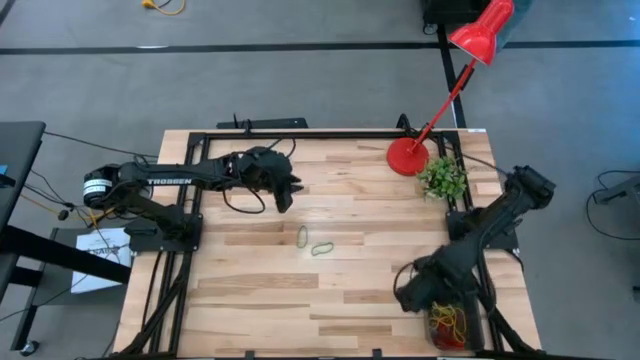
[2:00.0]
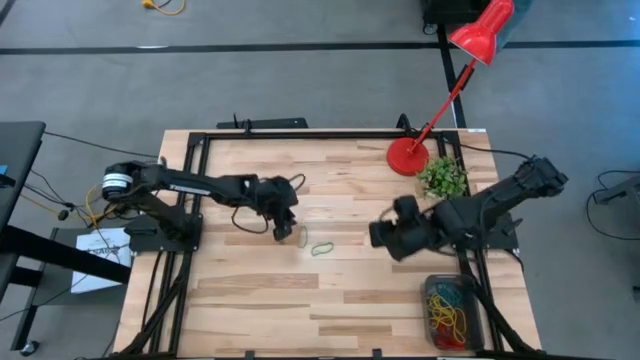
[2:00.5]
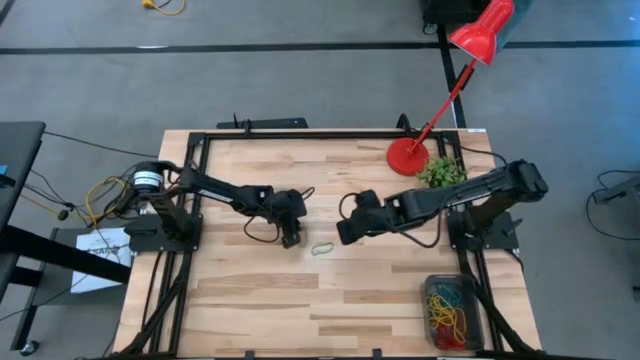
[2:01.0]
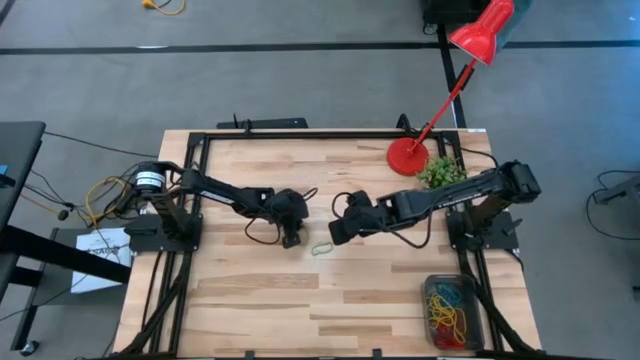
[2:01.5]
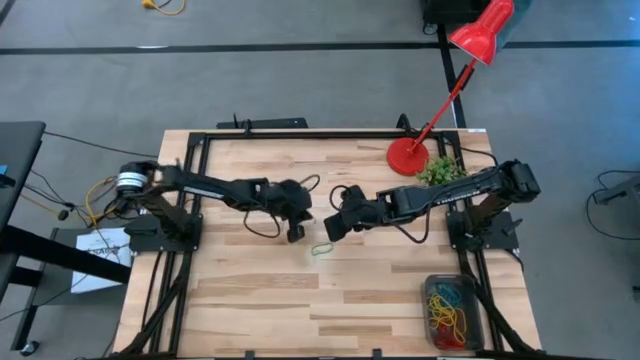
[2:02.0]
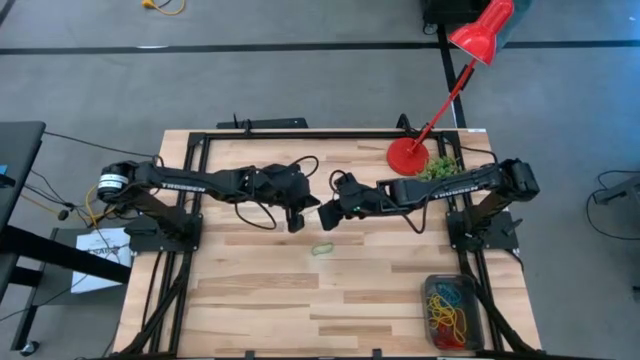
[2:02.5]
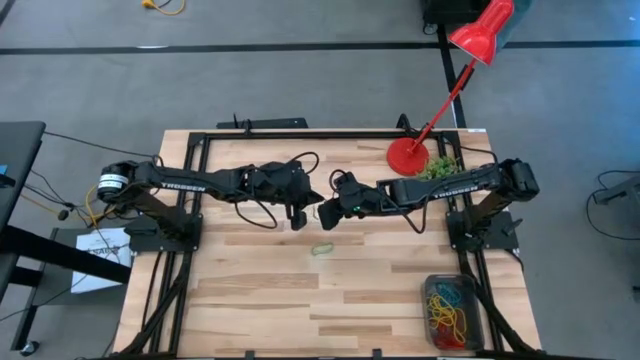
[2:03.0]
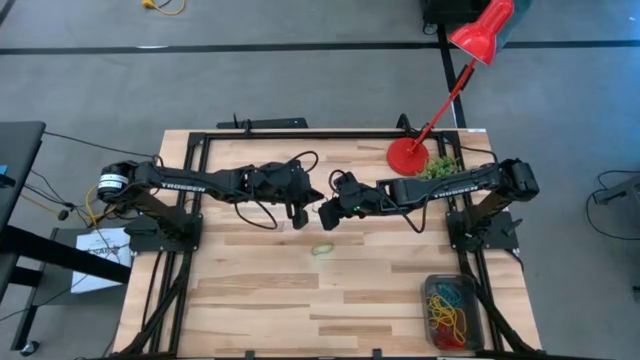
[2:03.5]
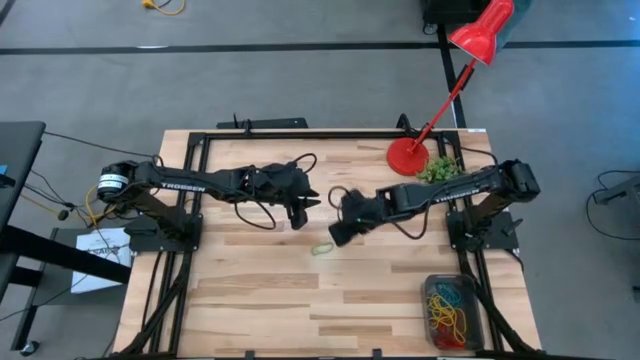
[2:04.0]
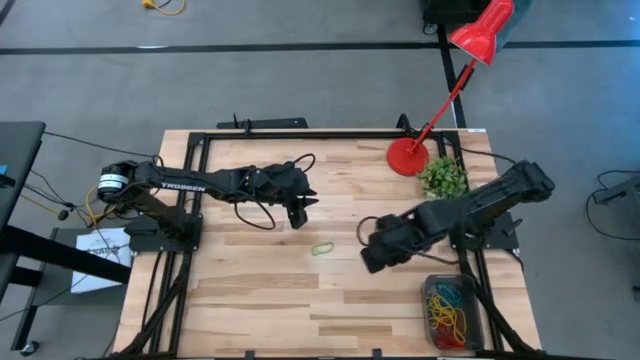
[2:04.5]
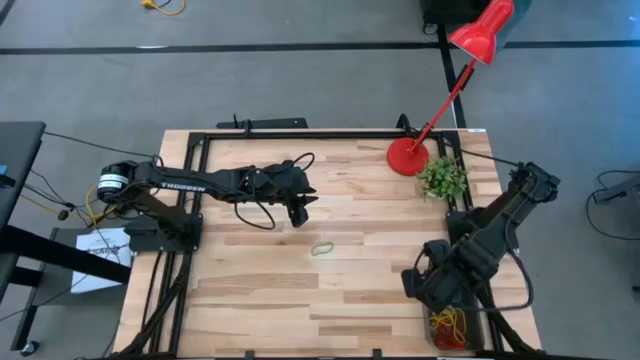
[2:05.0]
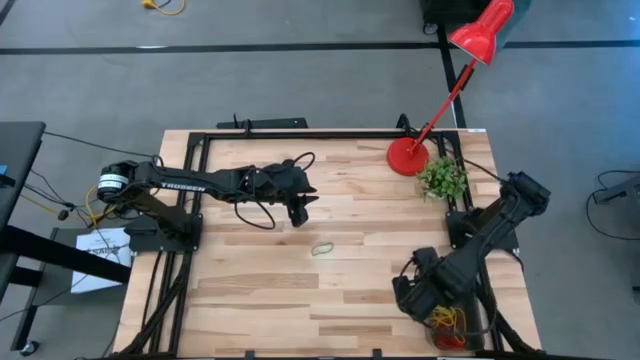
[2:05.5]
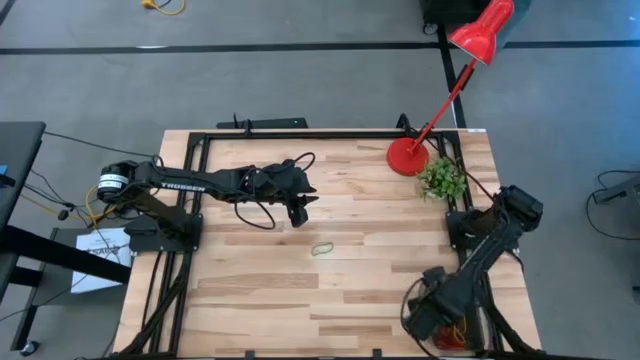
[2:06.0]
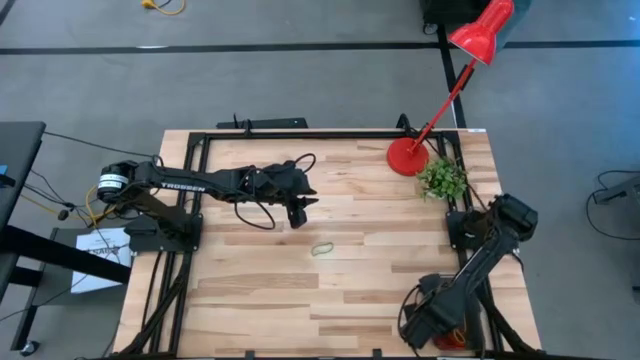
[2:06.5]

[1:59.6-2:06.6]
Task: Pick and place items into bin
Put the green rubber band into the black bin

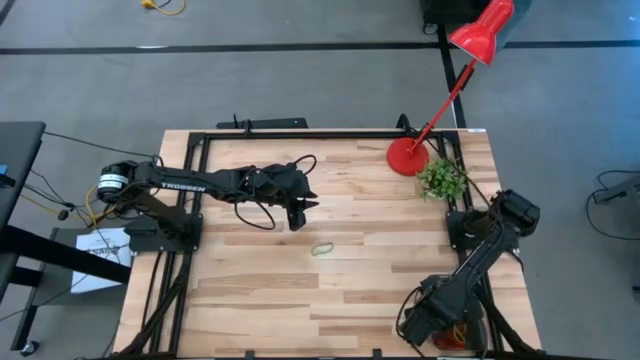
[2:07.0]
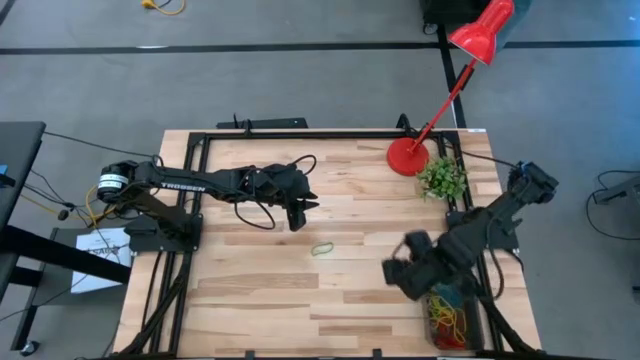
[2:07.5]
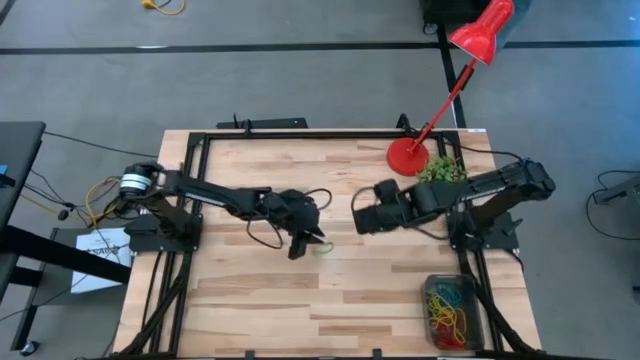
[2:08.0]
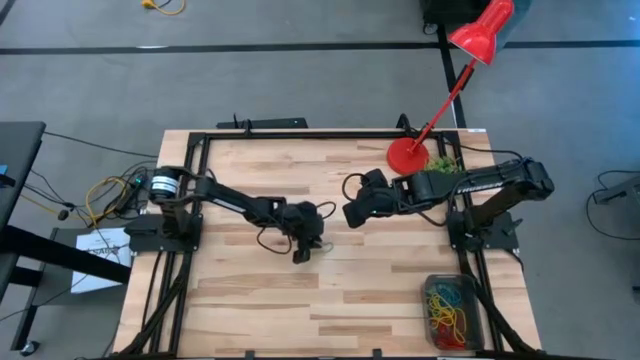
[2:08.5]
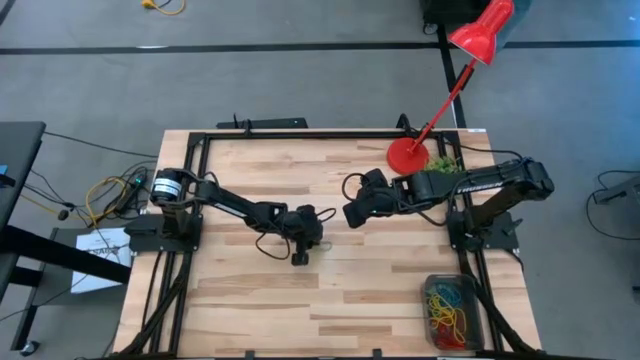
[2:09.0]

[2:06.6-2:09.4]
Put the green rubber band into the black bin

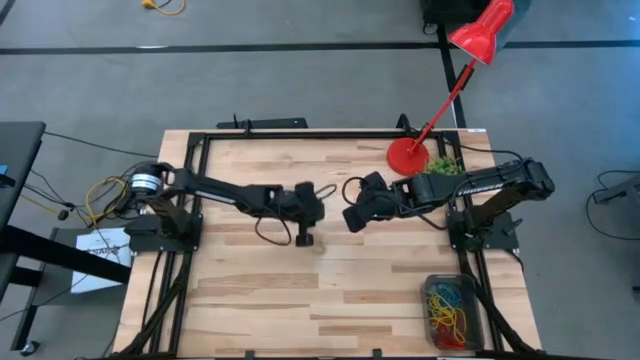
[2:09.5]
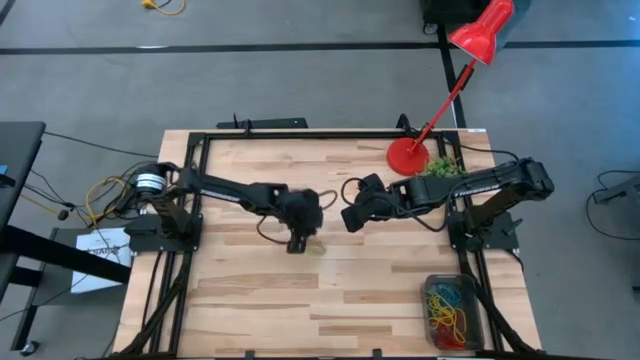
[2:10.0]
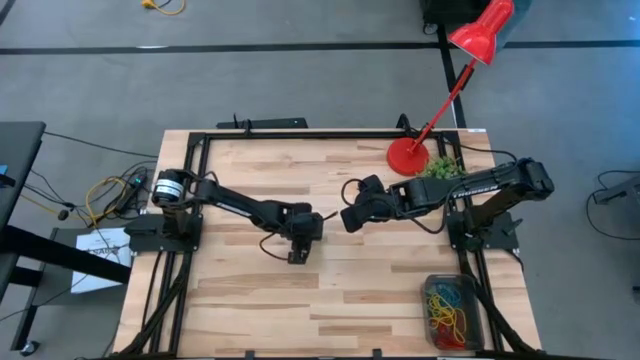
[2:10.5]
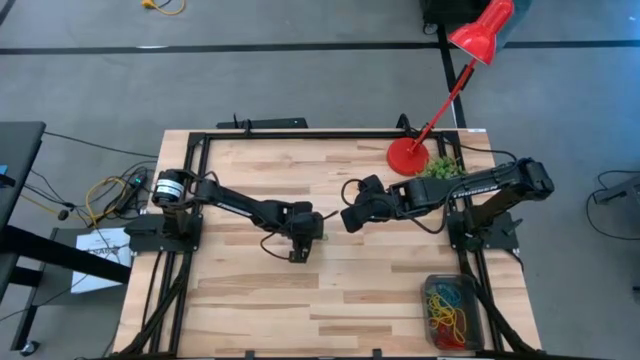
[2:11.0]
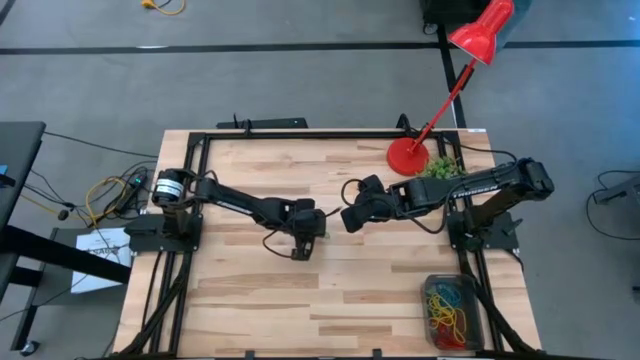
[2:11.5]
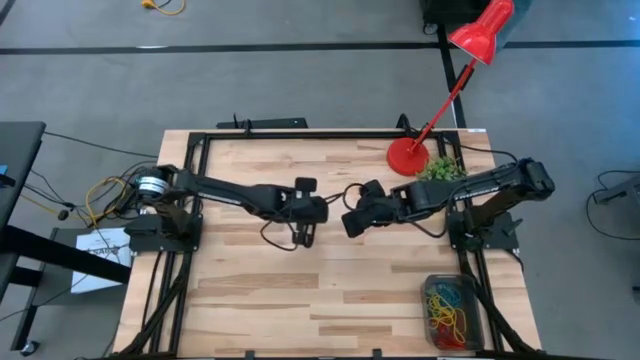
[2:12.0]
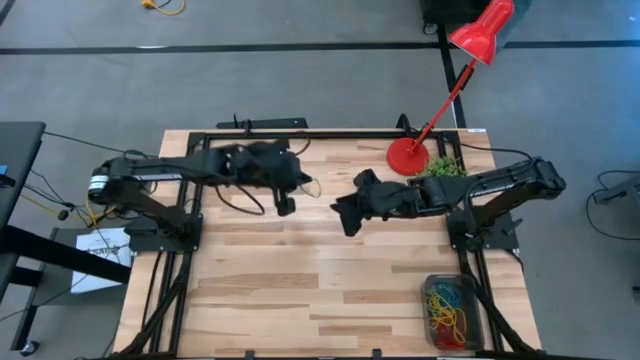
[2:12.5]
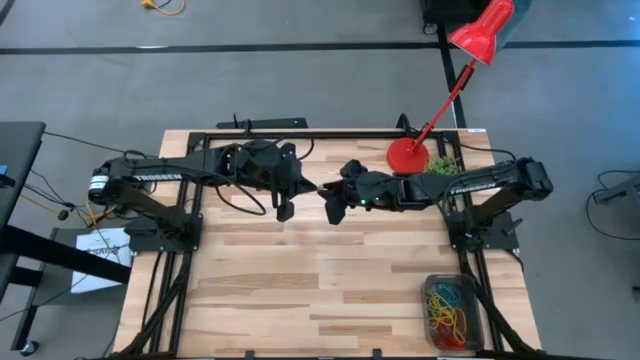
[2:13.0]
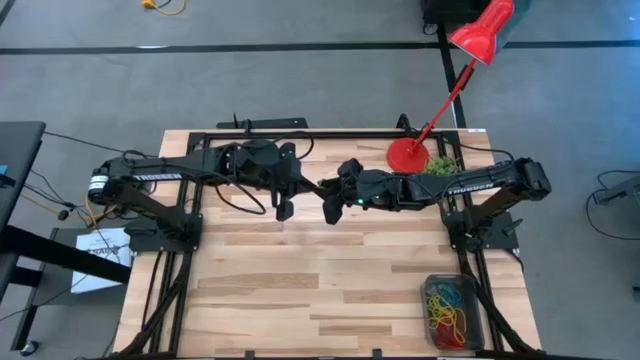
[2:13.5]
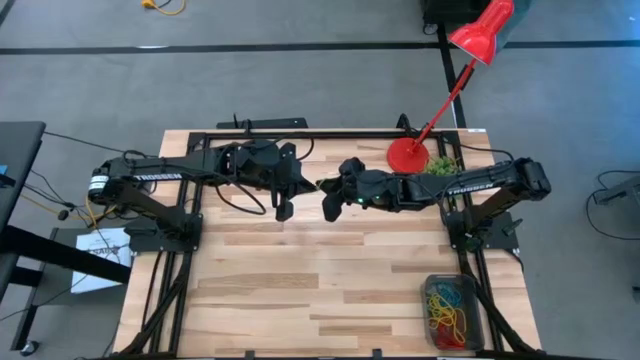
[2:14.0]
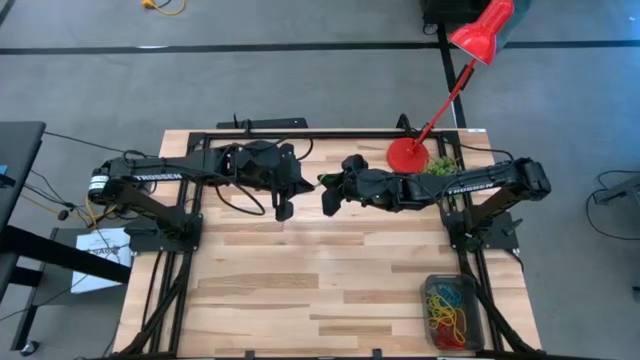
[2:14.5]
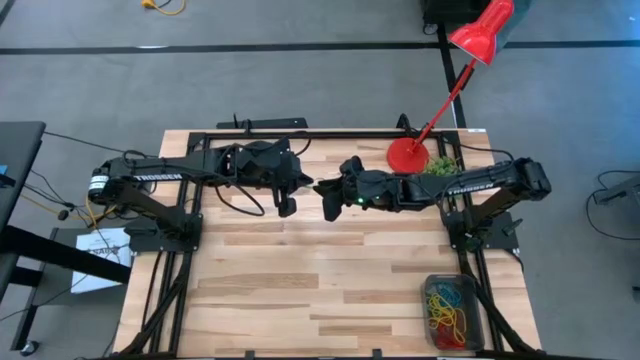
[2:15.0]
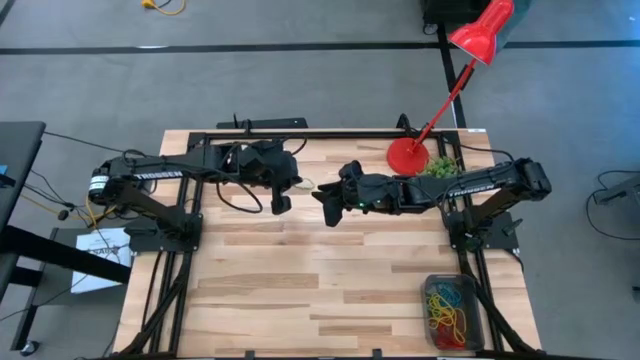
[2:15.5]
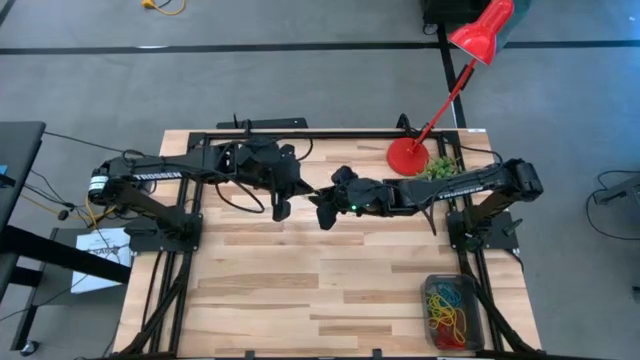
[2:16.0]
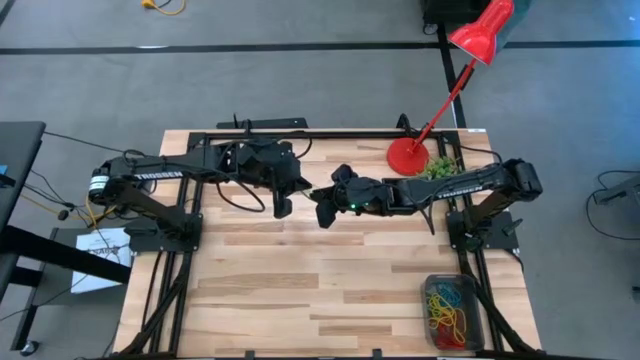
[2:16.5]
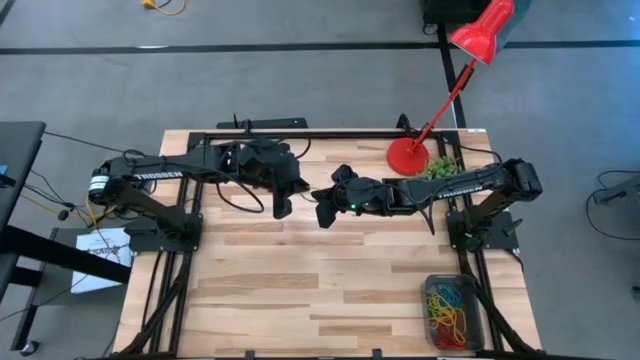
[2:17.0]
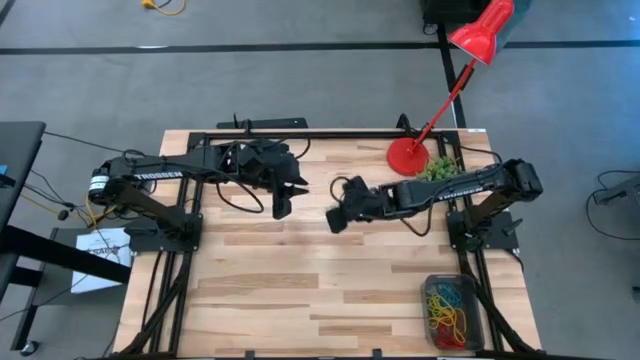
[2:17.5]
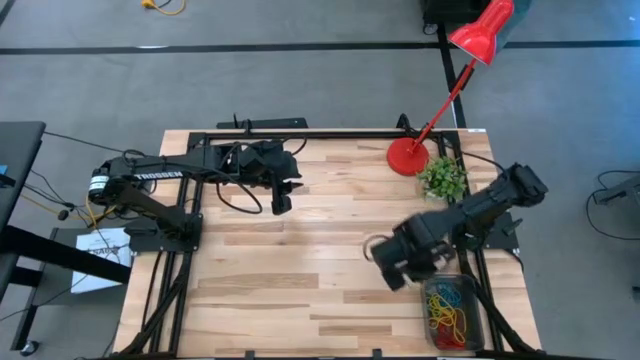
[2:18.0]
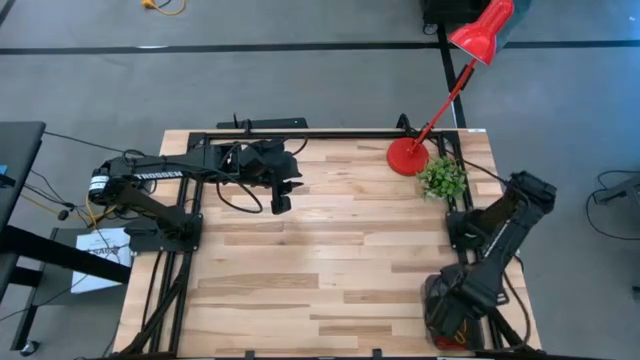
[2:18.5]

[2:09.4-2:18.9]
Put the green rubber band into the black bin

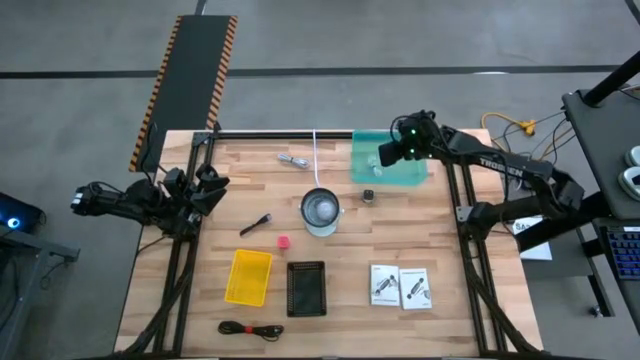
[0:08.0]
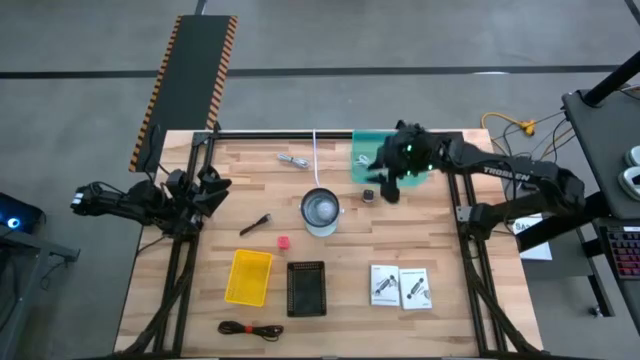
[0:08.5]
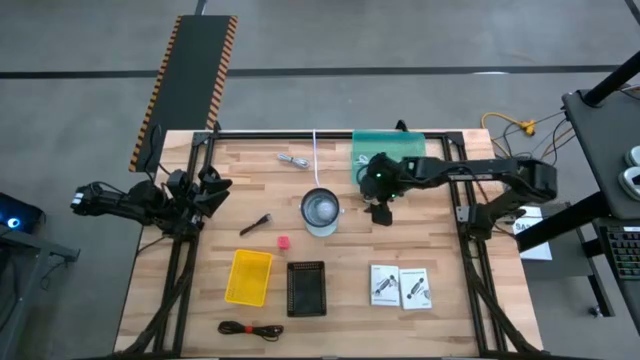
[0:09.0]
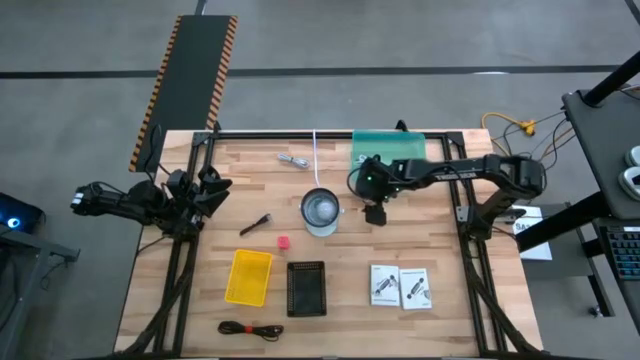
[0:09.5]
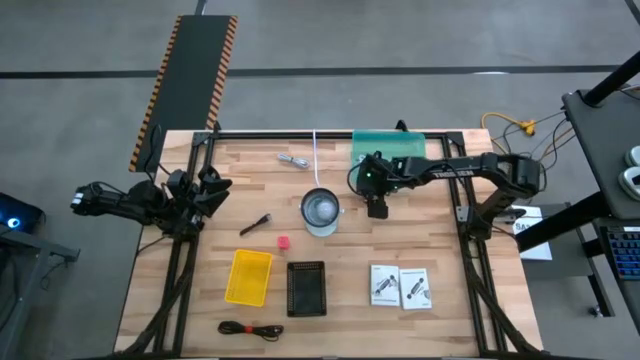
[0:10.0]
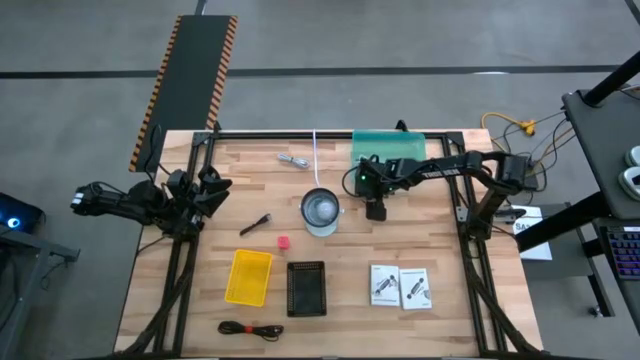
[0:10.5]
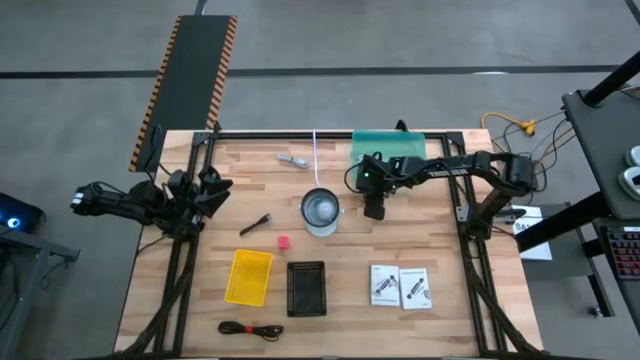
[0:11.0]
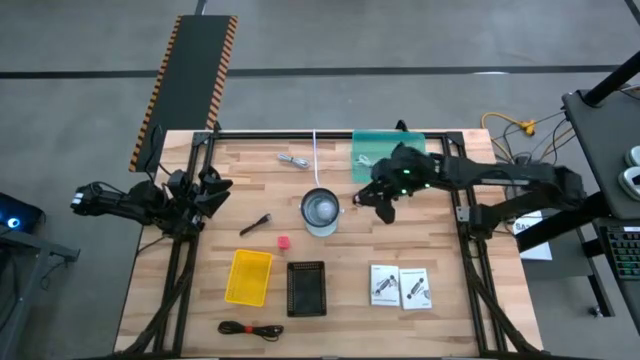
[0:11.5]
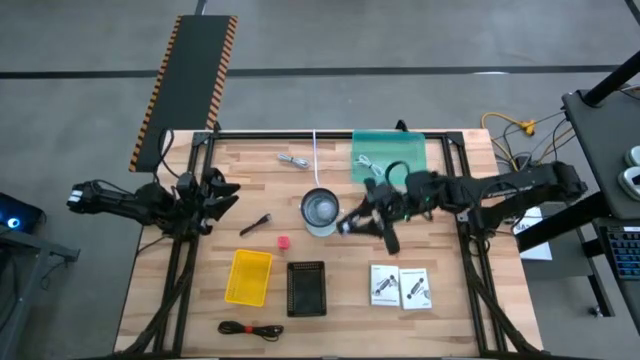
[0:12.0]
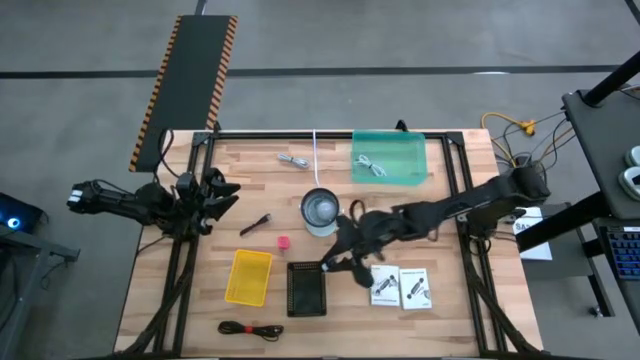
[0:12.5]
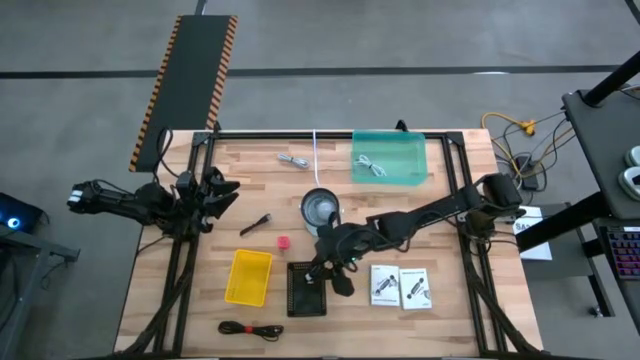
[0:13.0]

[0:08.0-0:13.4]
Task: Pick and place items into bin
Put the black adapter into the black bin
